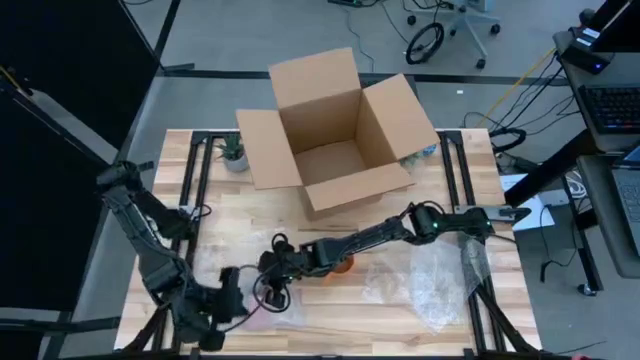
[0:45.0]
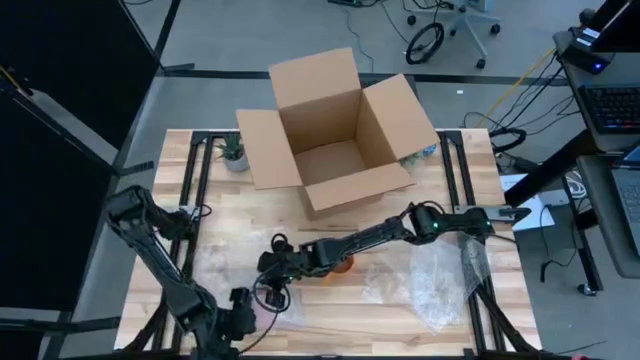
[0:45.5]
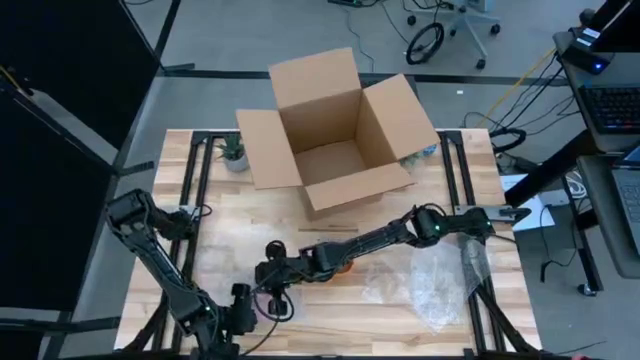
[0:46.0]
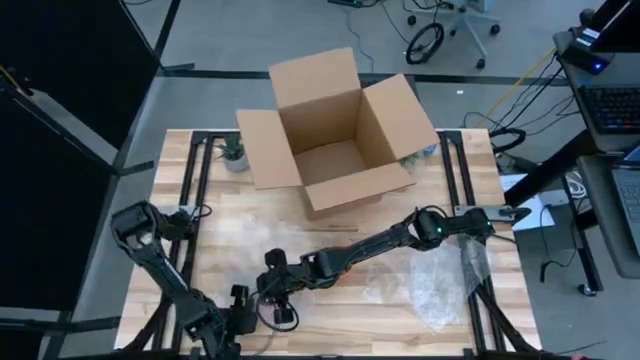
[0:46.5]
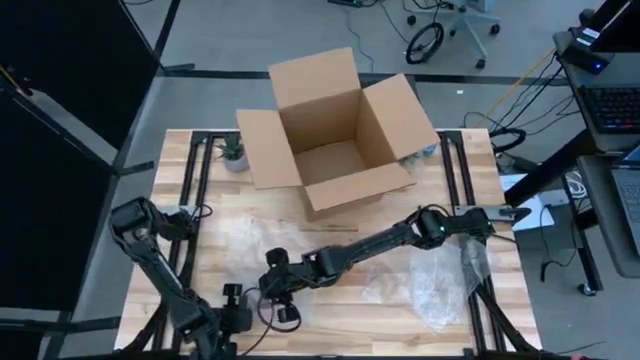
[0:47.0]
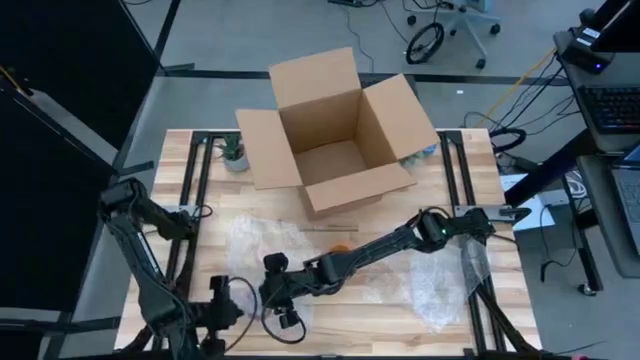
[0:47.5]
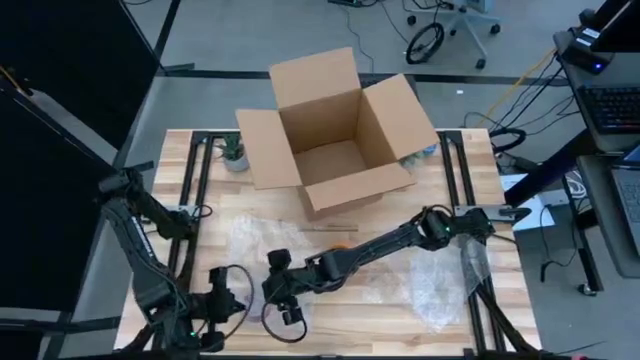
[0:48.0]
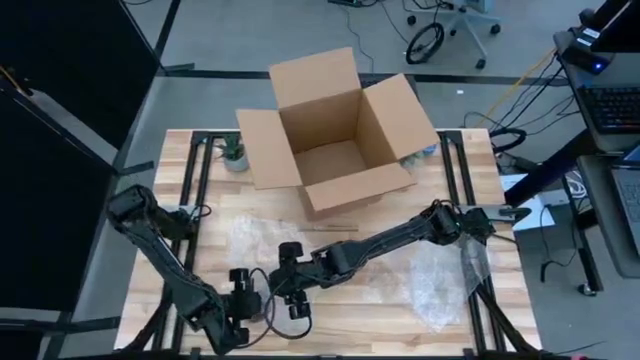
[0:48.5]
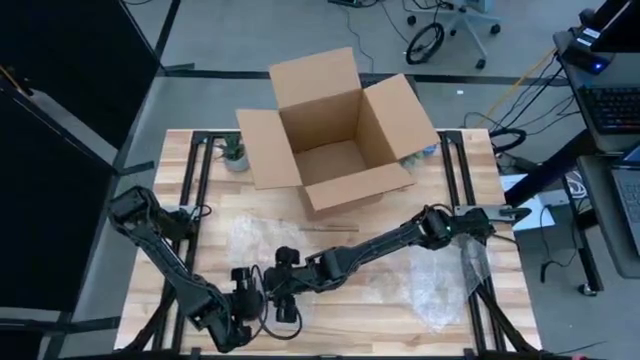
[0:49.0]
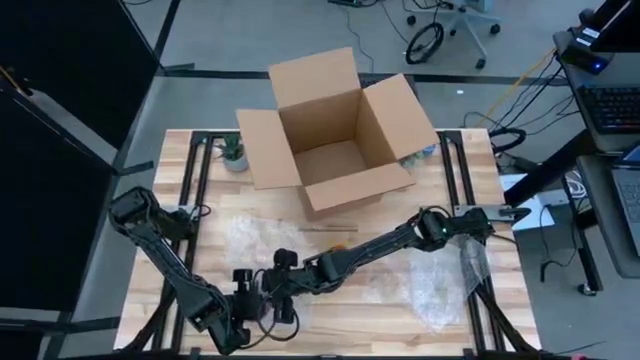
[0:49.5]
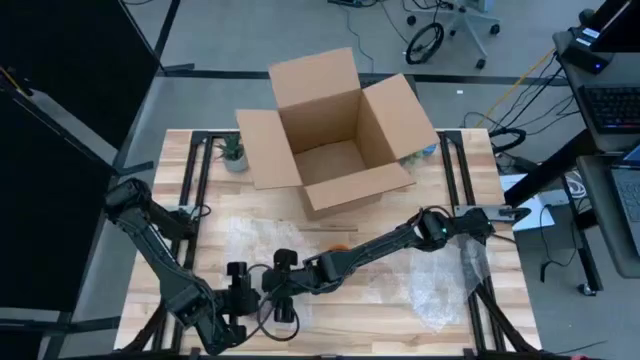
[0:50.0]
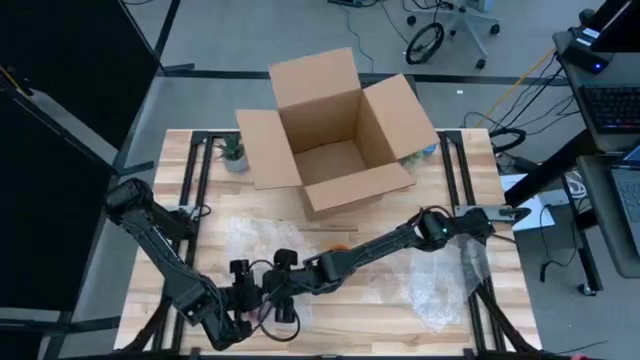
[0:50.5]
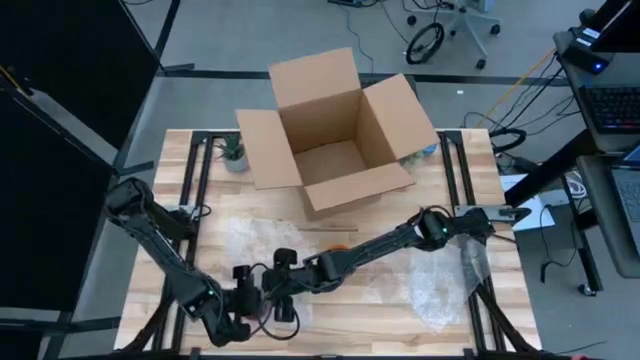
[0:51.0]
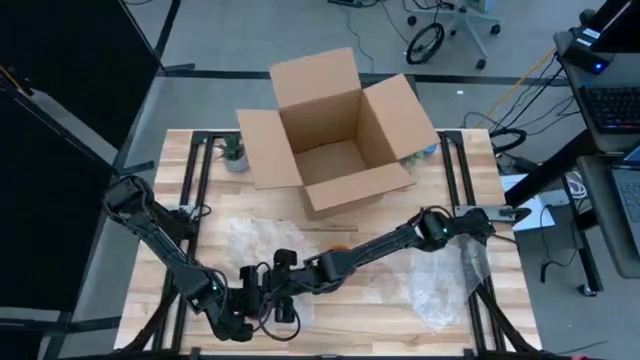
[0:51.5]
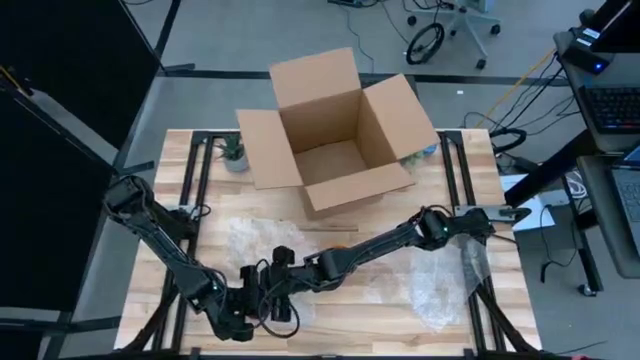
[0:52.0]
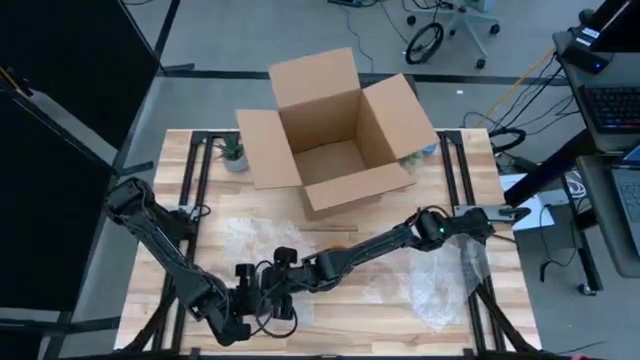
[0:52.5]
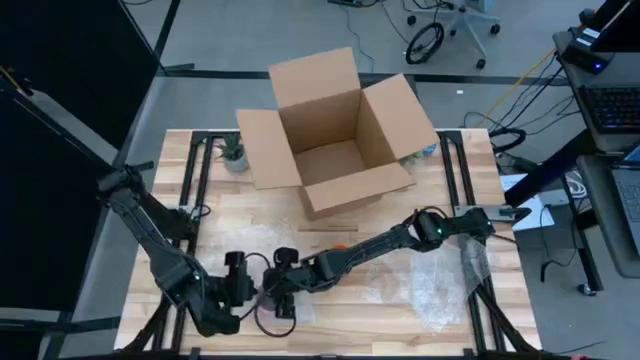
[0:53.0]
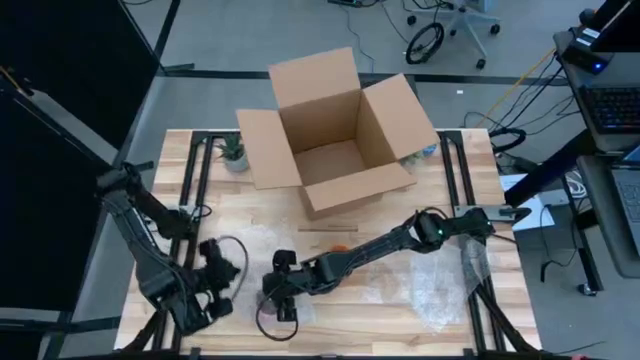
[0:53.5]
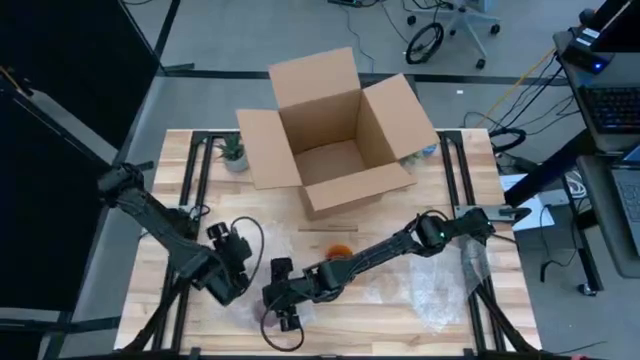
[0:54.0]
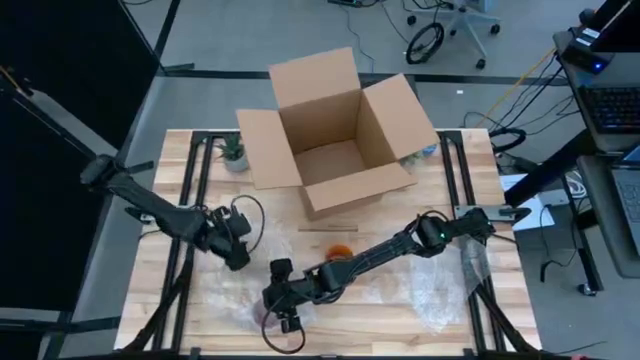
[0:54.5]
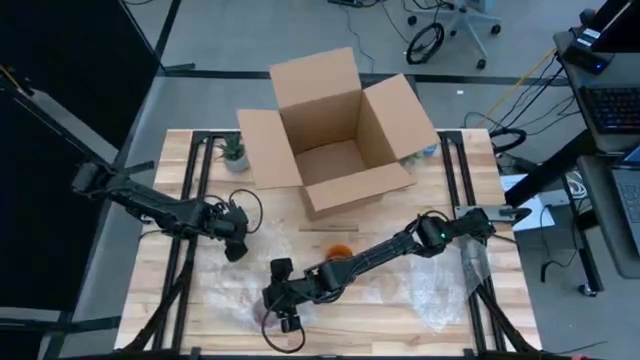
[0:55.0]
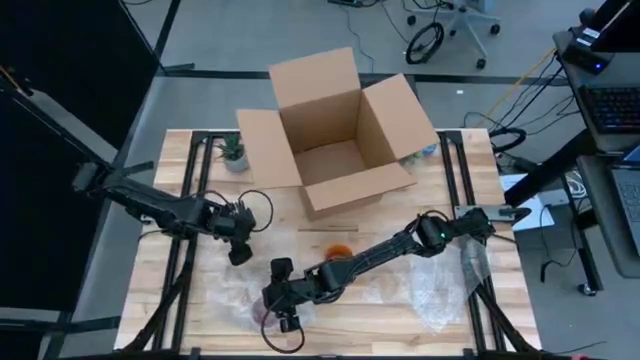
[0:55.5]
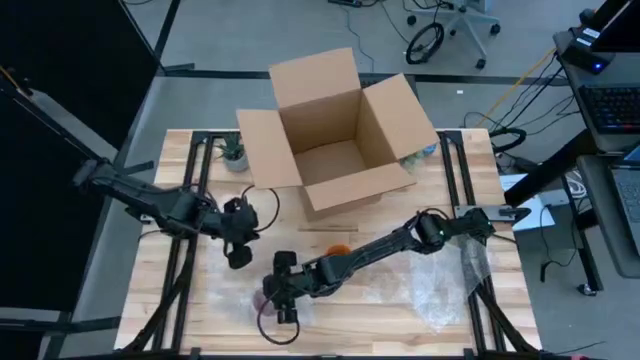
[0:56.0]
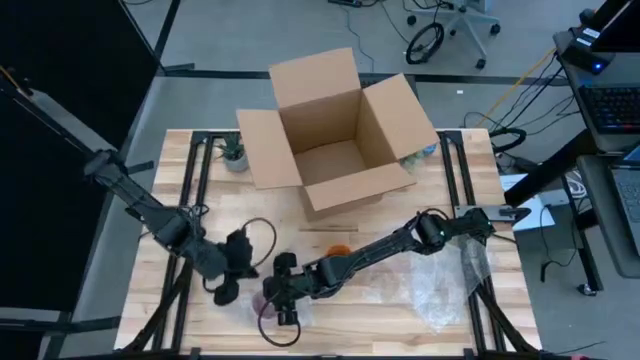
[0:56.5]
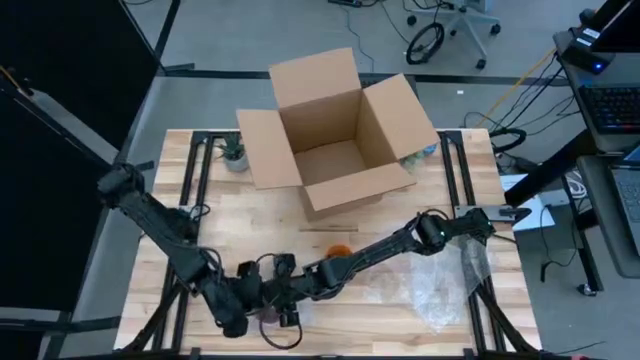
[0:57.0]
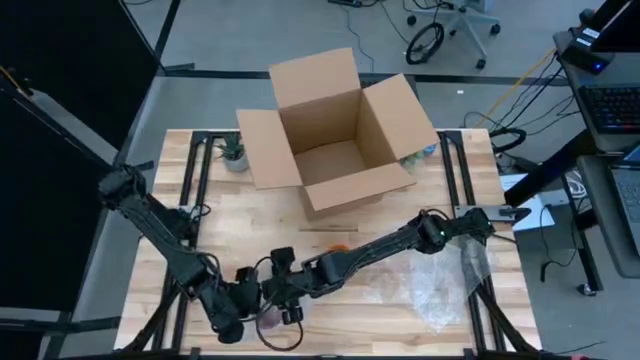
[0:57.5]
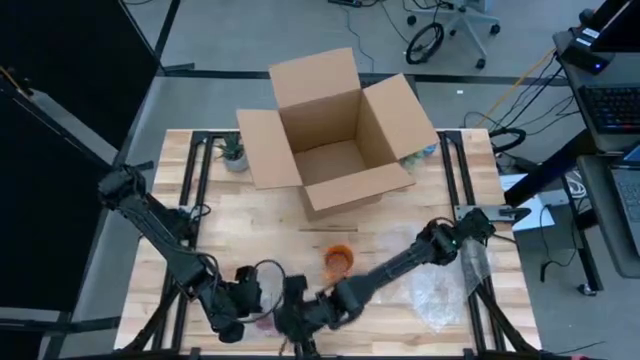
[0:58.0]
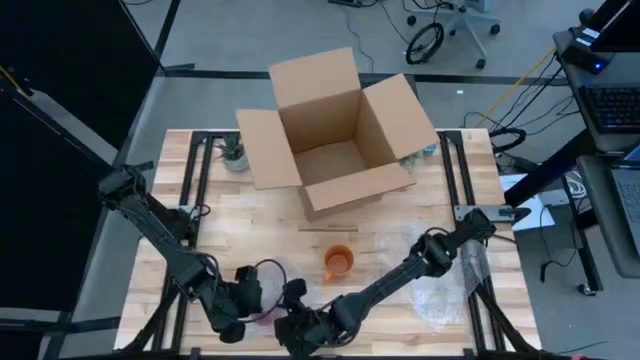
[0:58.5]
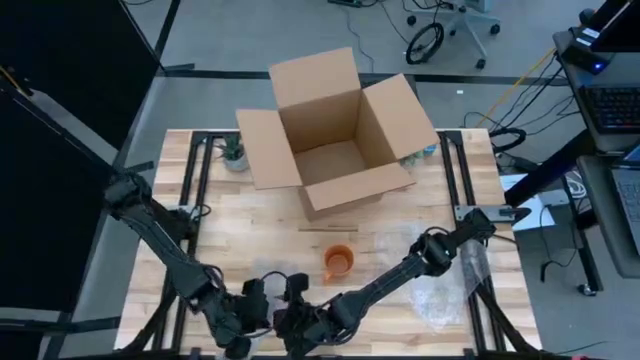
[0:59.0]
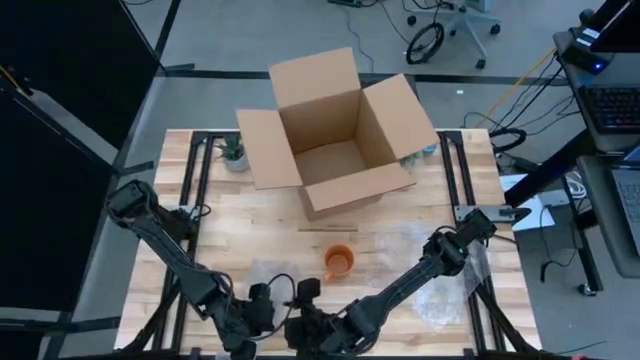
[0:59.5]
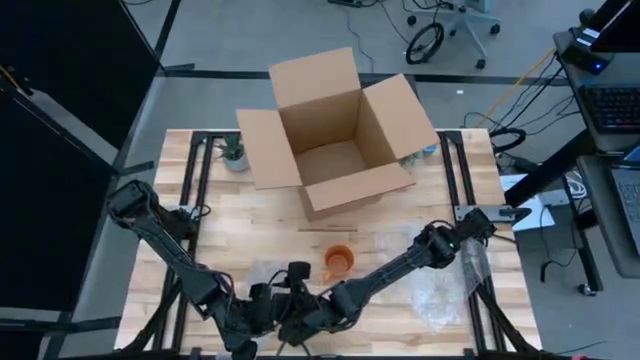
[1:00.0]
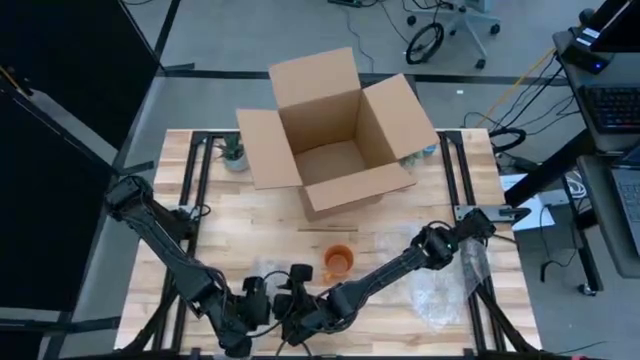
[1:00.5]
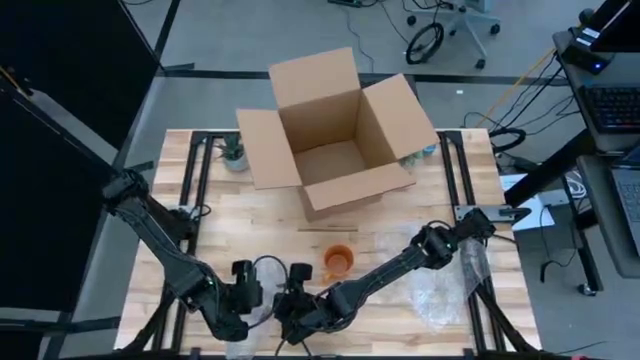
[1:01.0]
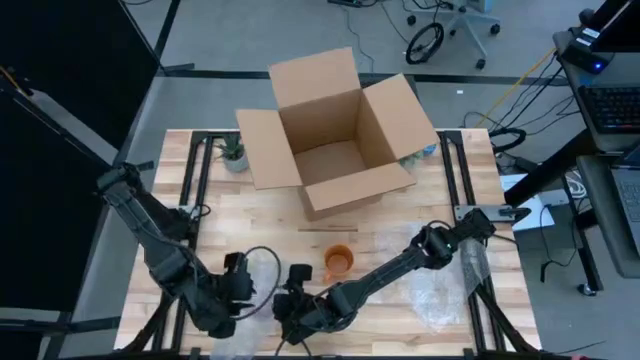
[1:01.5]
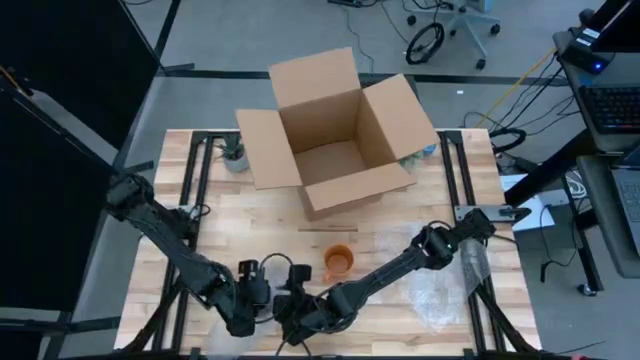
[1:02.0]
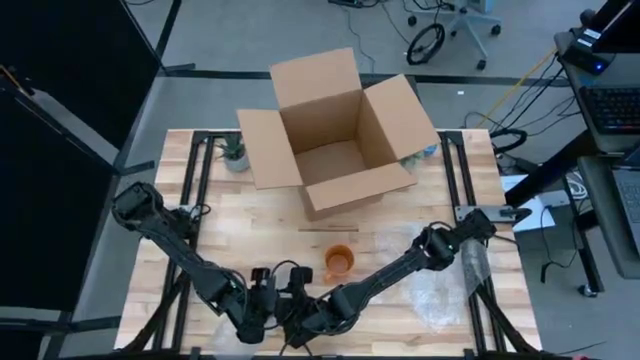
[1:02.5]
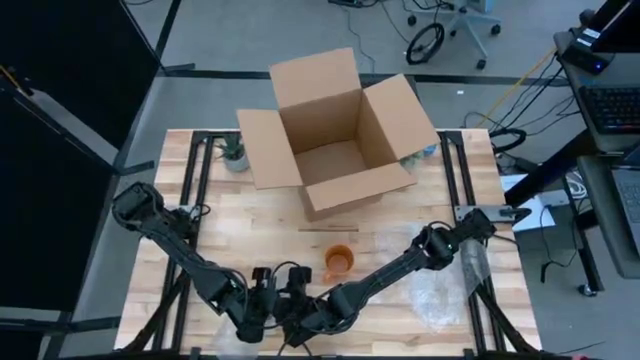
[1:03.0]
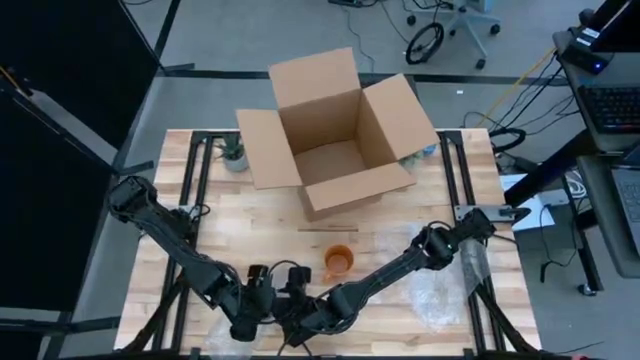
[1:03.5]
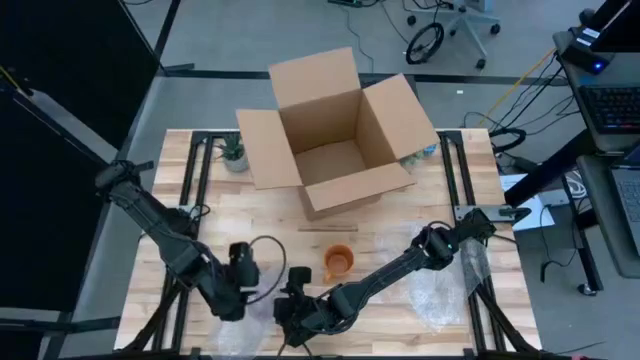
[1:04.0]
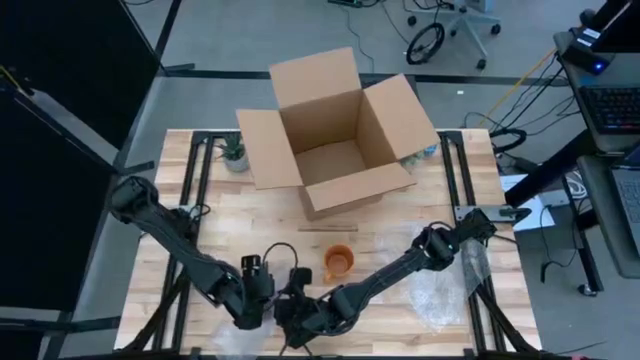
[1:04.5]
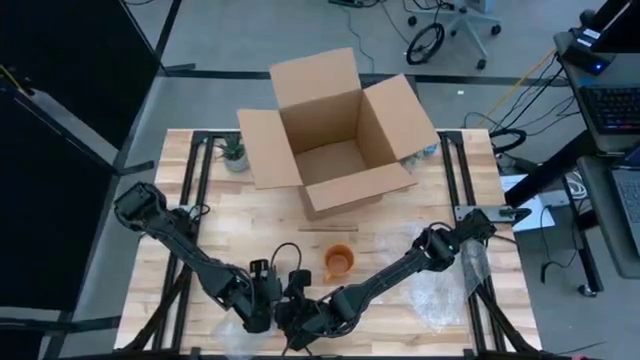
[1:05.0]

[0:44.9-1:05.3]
Task: wrap mug
Wrap the pink mug with transparent bubble wrap
